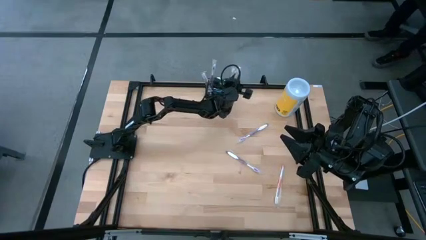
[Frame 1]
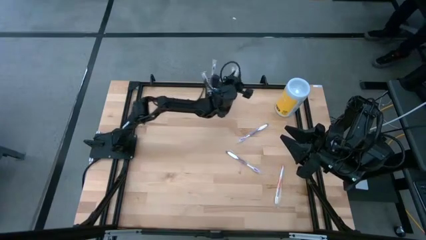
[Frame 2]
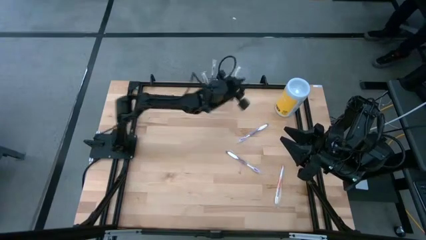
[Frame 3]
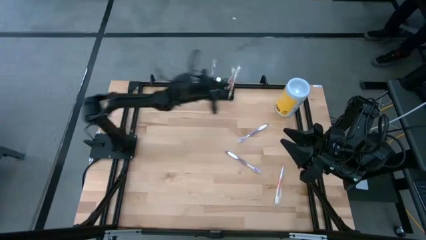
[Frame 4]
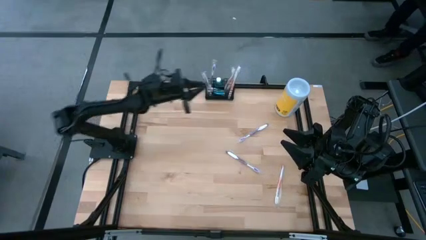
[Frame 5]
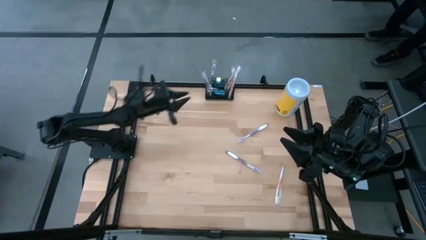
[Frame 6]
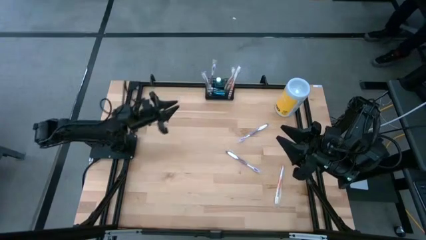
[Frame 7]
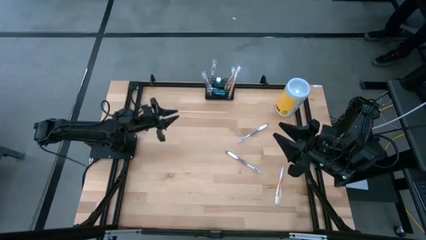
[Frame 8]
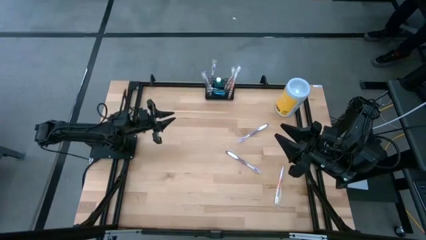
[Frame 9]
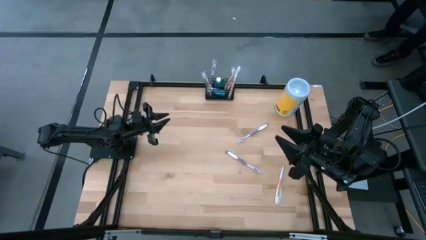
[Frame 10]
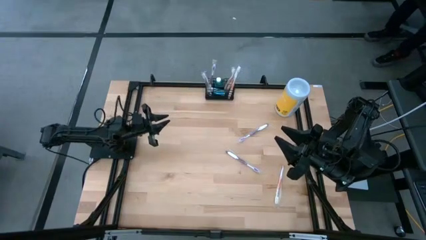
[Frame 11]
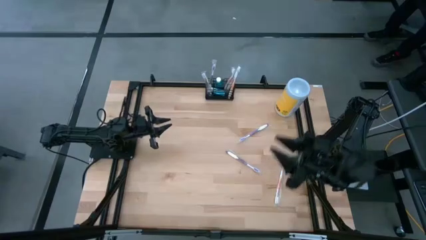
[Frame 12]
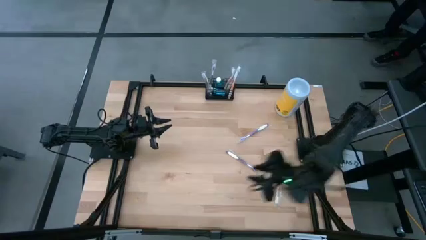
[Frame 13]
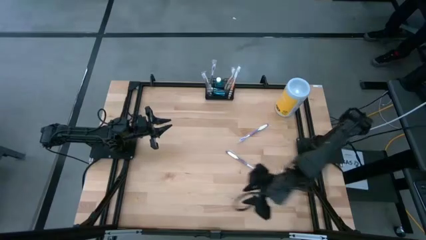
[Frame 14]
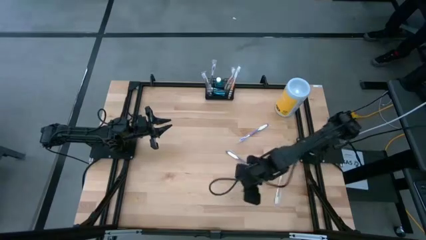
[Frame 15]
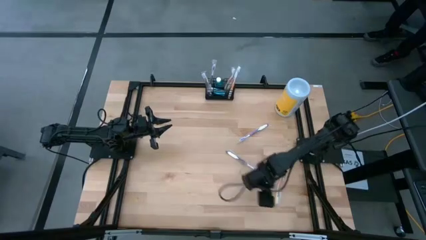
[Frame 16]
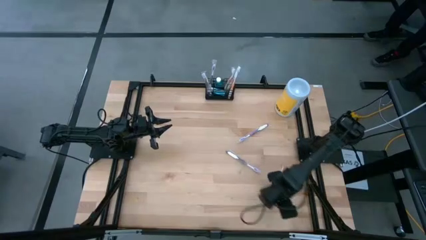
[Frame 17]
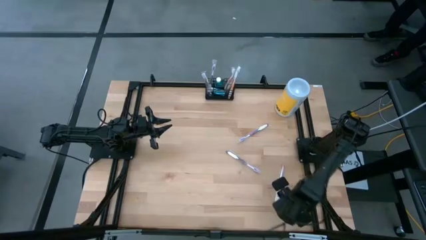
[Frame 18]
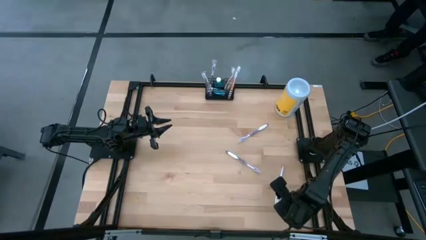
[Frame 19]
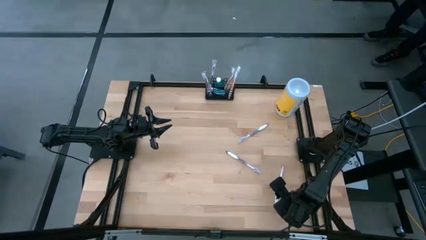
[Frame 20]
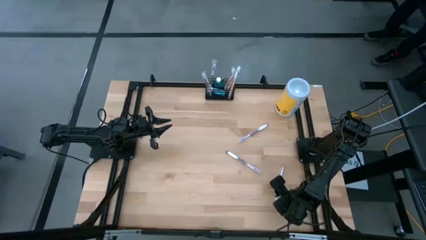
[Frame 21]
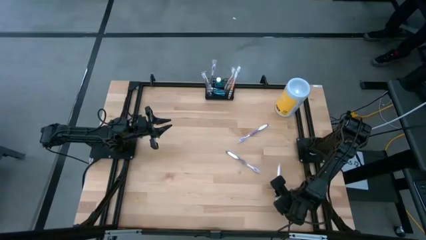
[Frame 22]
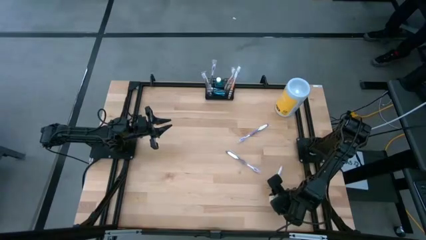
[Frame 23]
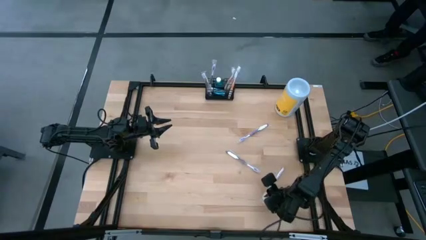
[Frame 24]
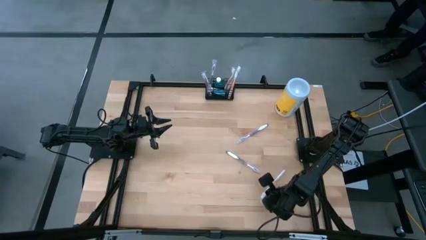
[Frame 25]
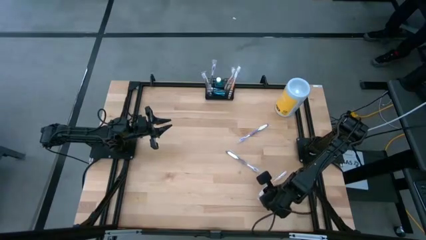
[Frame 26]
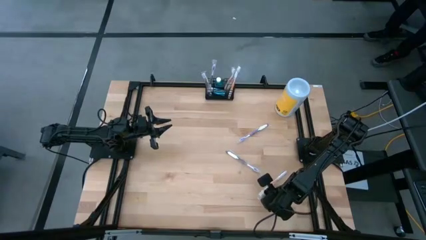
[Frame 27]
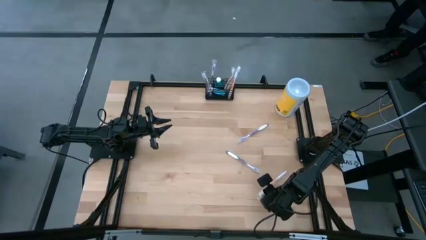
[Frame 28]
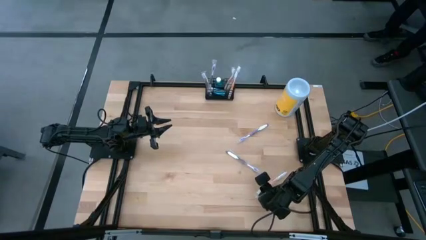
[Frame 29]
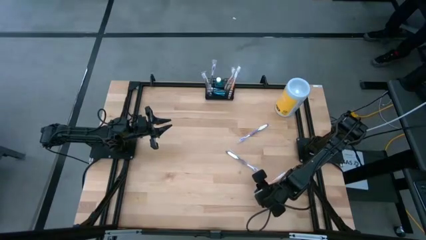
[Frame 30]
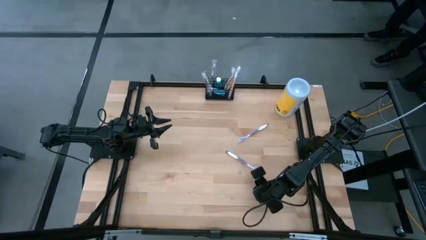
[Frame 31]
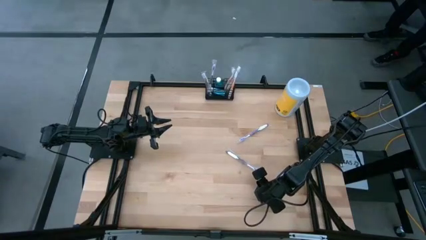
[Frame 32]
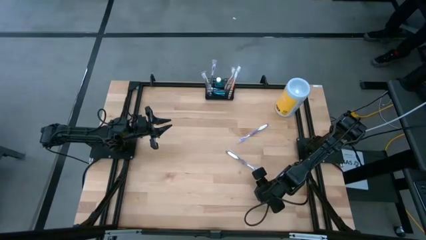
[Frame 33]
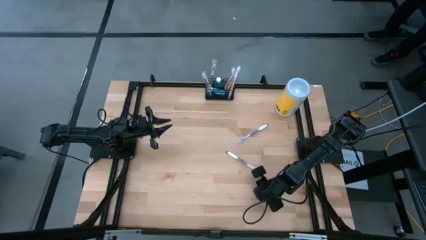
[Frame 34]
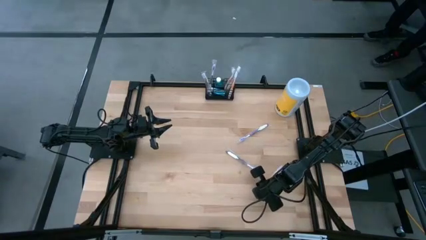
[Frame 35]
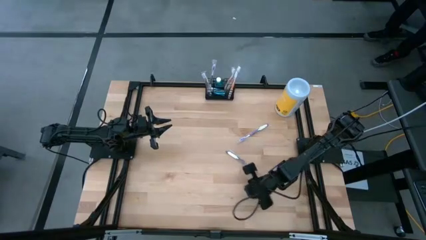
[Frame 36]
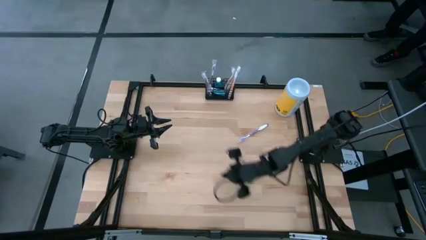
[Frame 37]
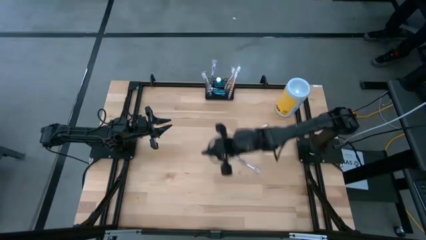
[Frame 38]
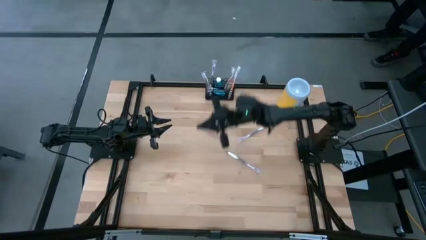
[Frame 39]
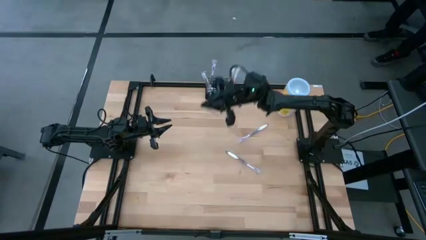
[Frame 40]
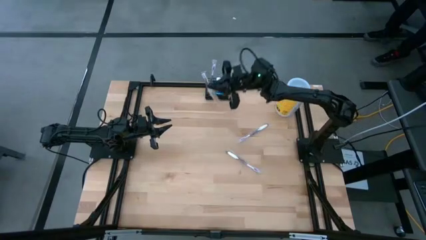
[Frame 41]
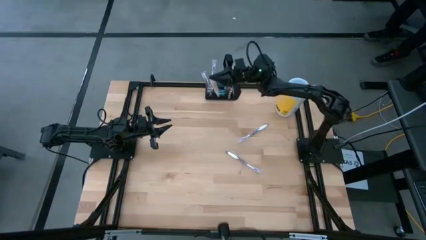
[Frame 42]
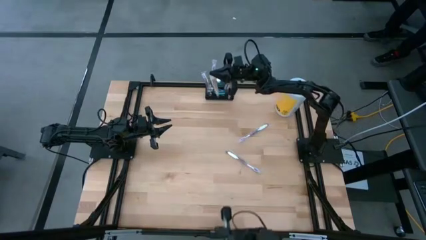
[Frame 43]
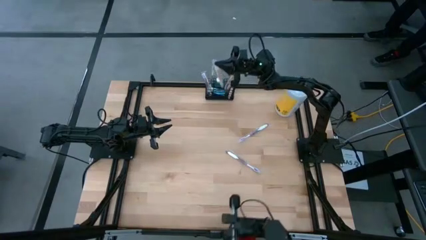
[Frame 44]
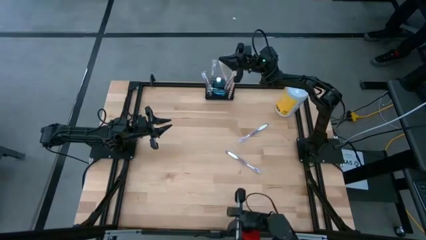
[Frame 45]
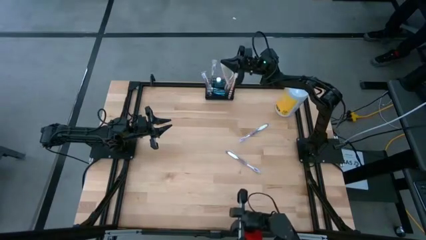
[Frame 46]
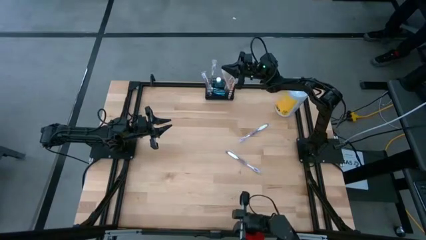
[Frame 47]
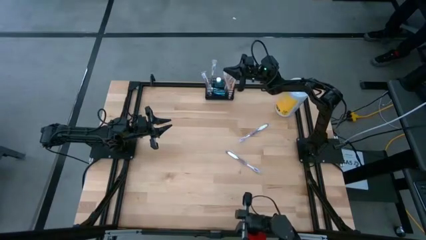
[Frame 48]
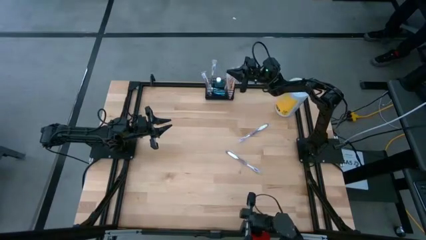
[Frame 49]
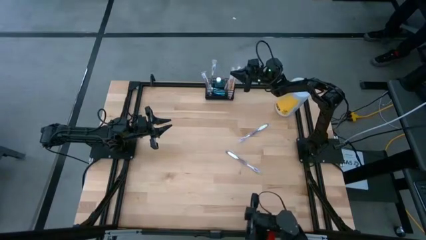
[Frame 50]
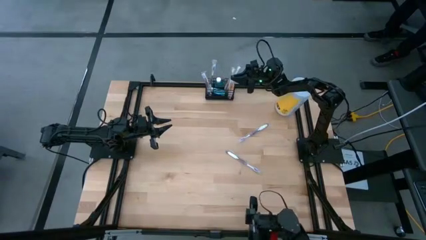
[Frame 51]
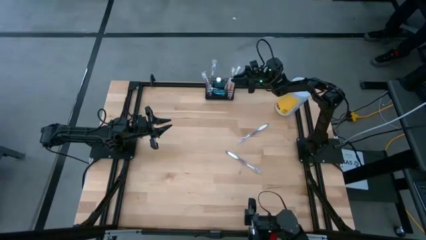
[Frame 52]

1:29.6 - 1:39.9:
Task: Pick & Place toothbrushing station
Put the orange toothbrush into the black wire organizer bin
